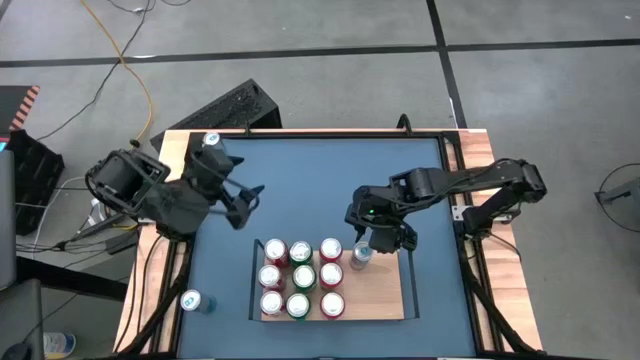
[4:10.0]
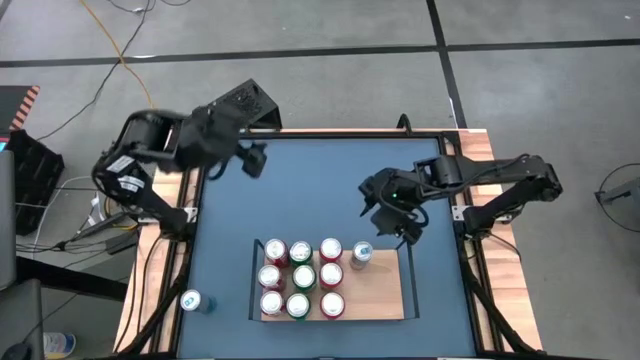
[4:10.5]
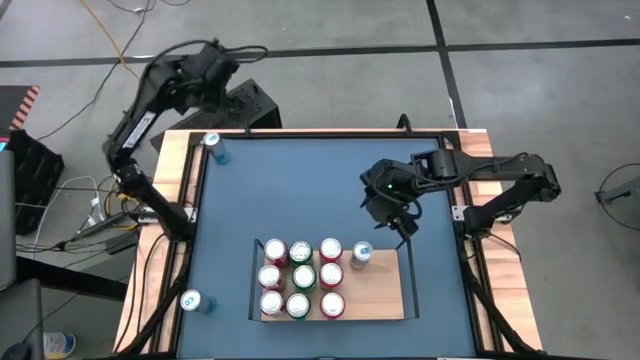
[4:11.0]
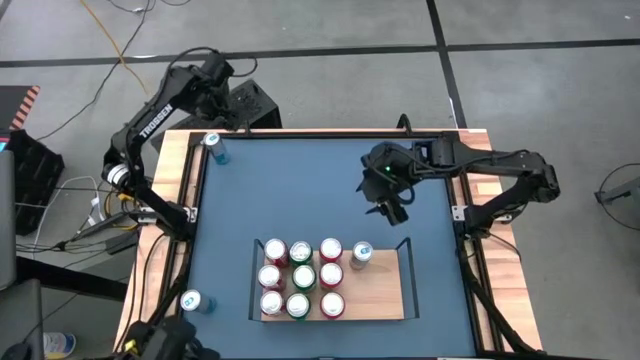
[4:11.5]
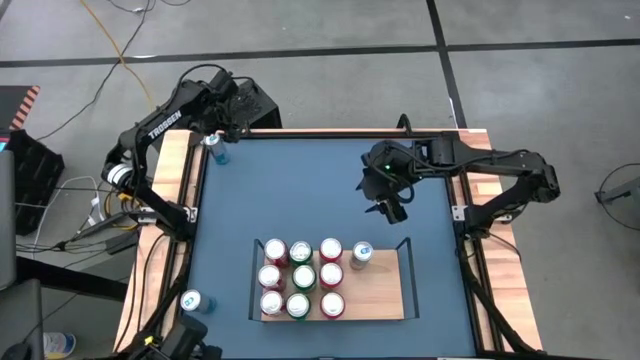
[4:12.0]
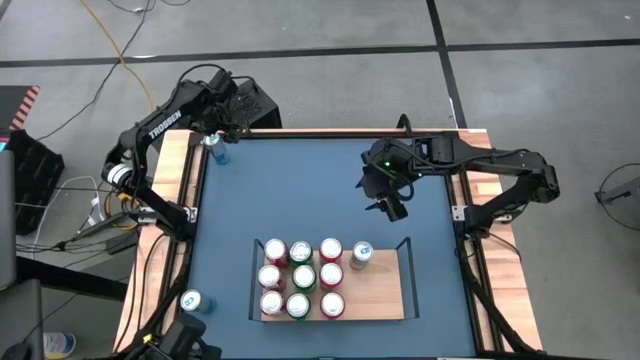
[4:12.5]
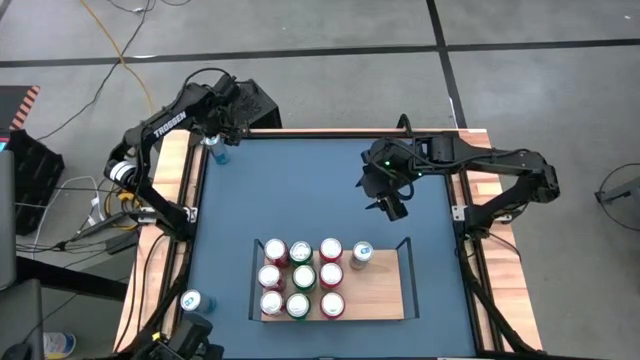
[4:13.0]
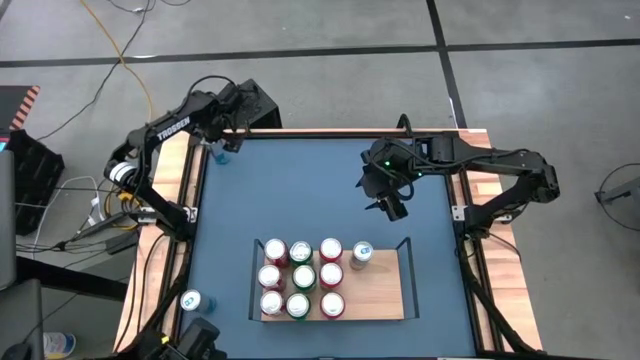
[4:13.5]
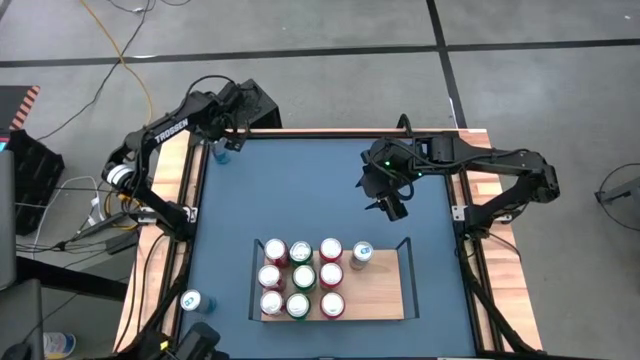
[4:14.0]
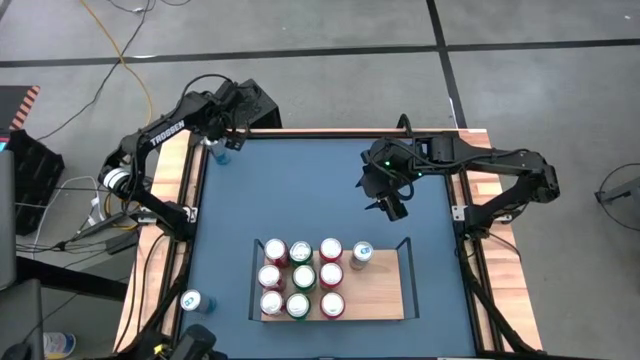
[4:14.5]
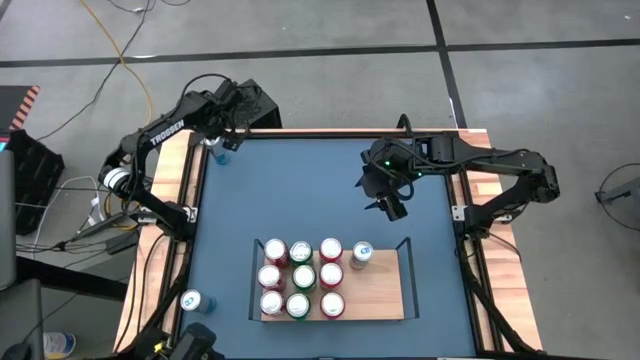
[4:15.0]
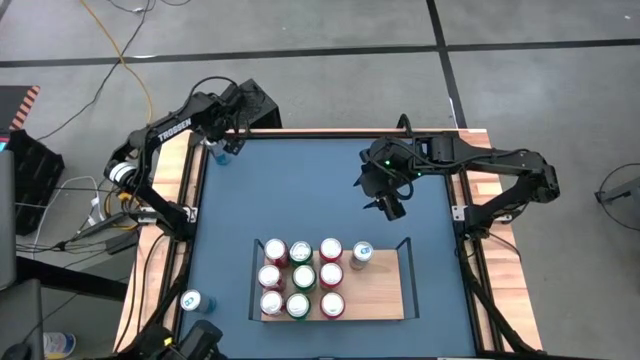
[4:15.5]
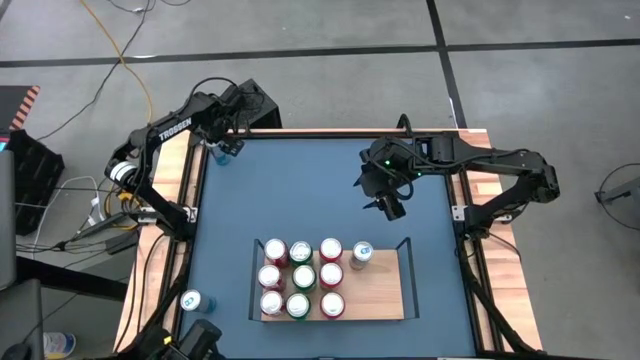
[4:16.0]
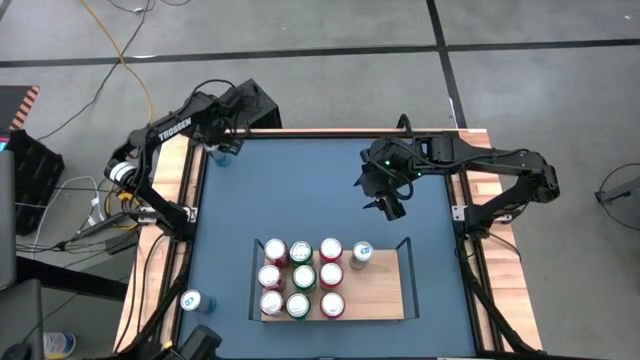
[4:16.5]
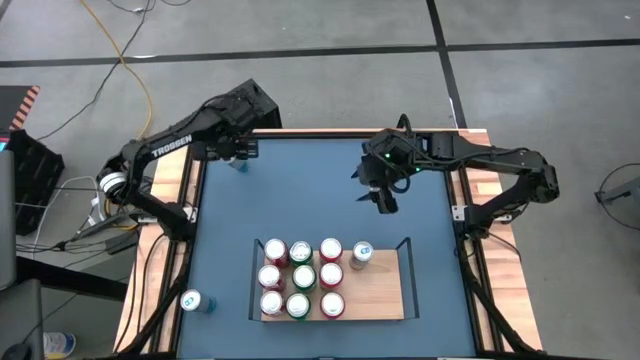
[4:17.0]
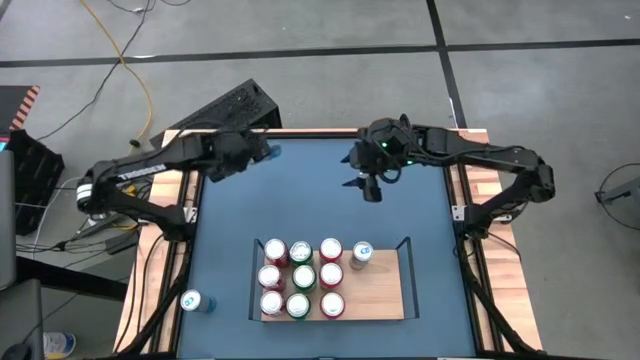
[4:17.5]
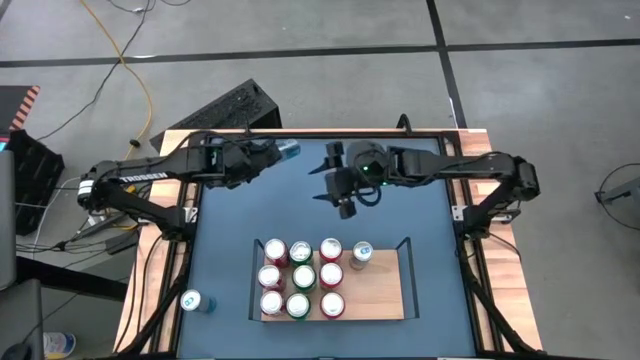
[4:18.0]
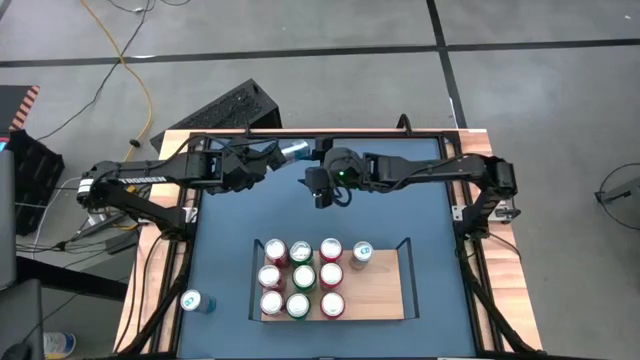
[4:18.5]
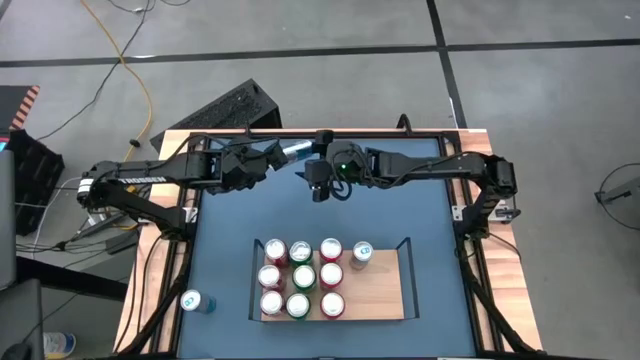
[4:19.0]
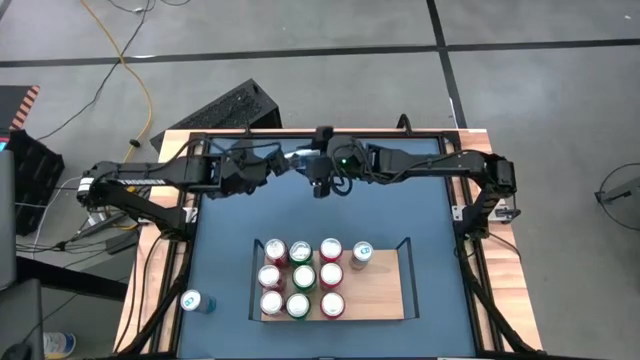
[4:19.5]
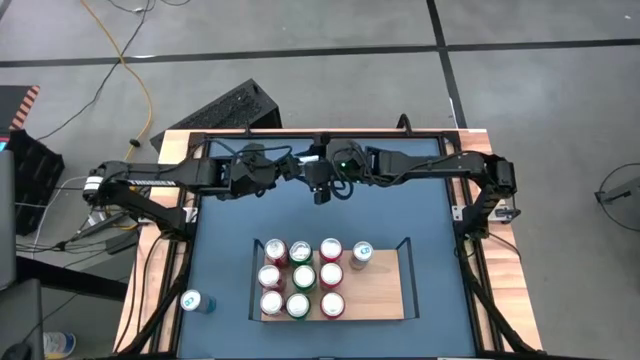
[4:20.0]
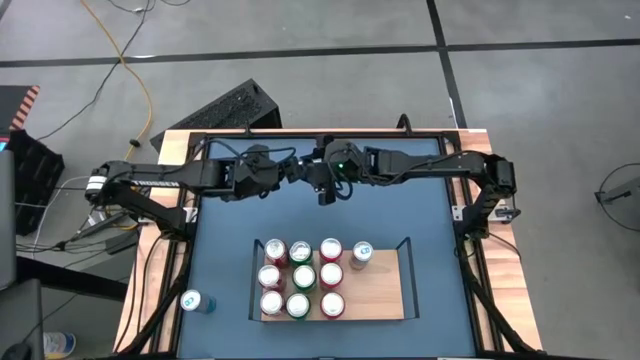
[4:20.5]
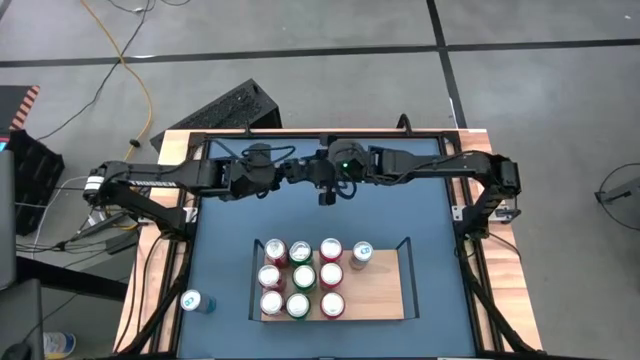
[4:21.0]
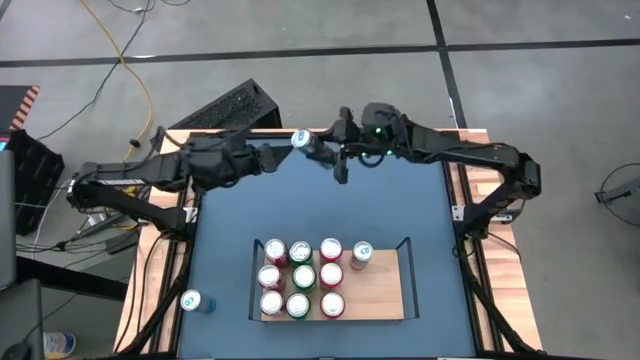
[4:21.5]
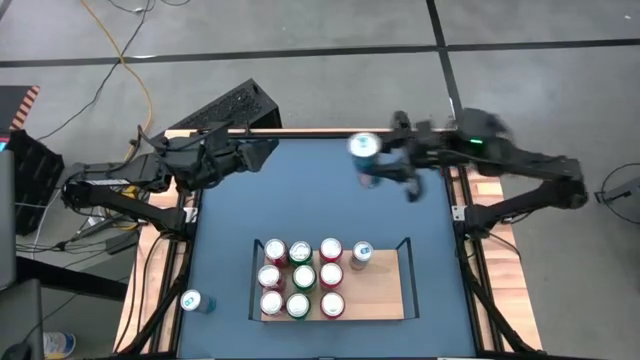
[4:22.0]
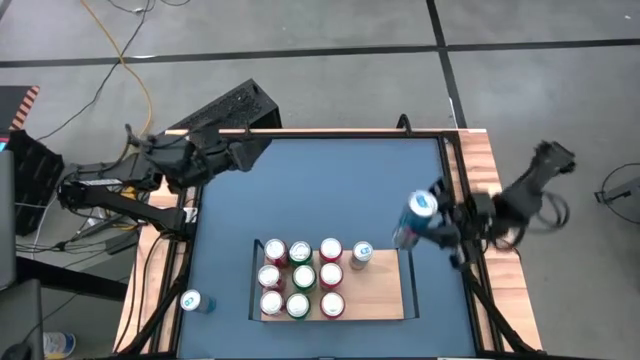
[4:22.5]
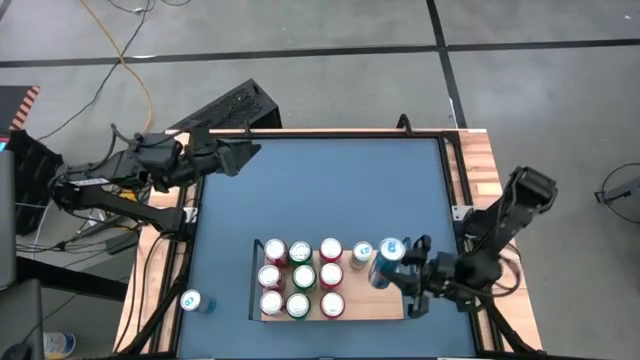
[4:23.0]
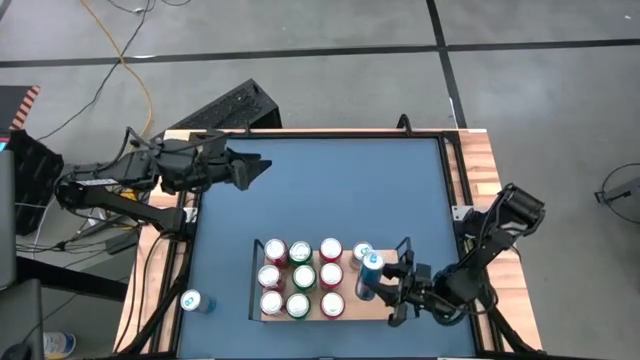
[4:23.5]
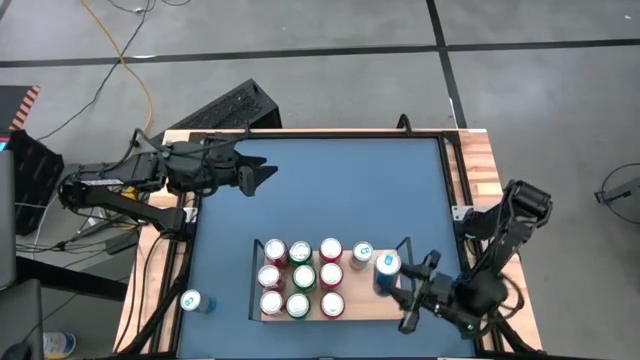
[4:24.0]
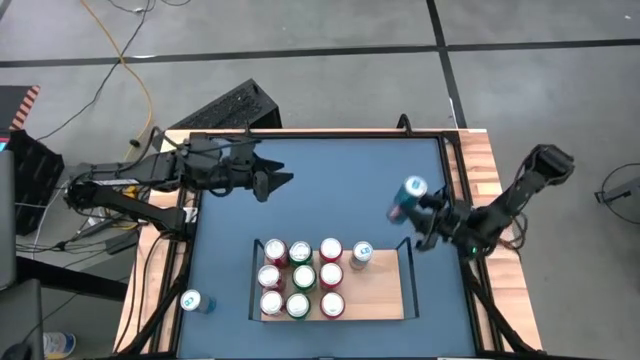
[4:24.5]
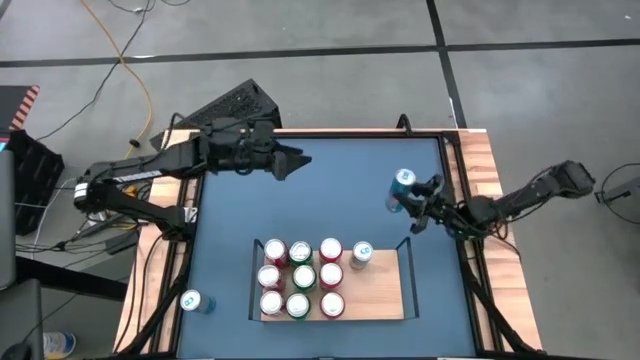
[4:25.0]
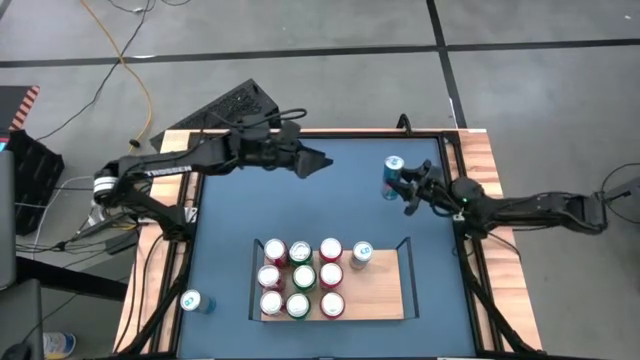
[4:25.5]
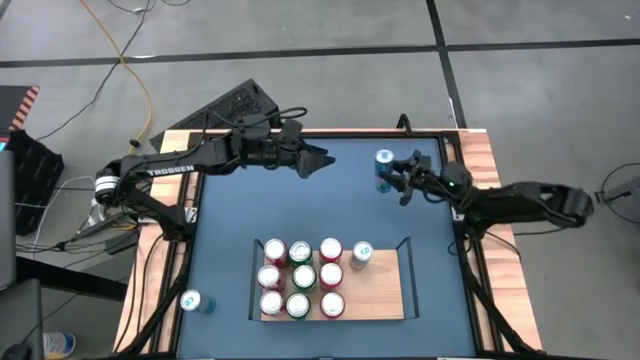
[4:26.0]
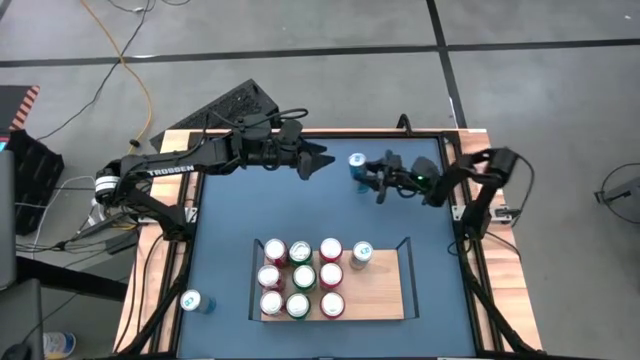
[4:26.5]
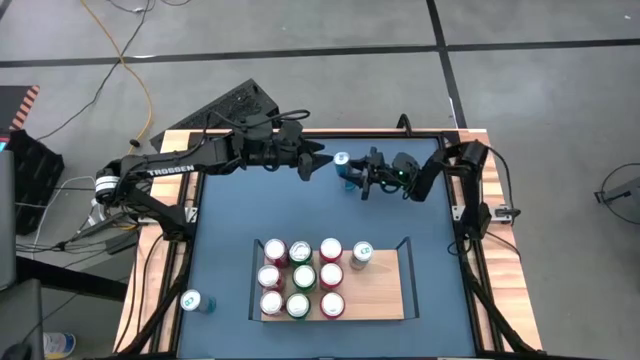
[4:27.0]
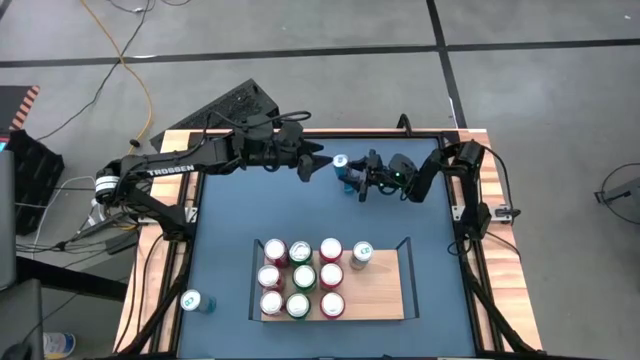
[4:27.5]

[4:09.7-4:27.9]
Task: Place canned beverage on shelf
Put the top blue soda can on the shelf aligned with the other blue soda can

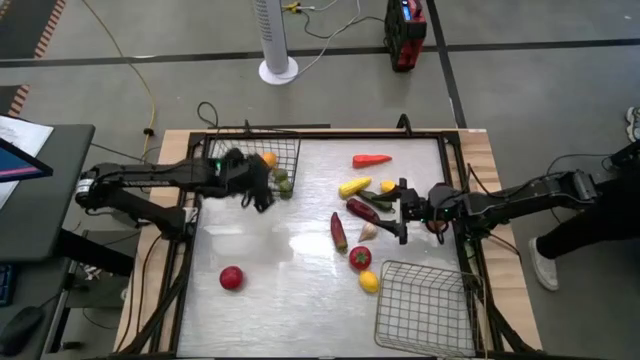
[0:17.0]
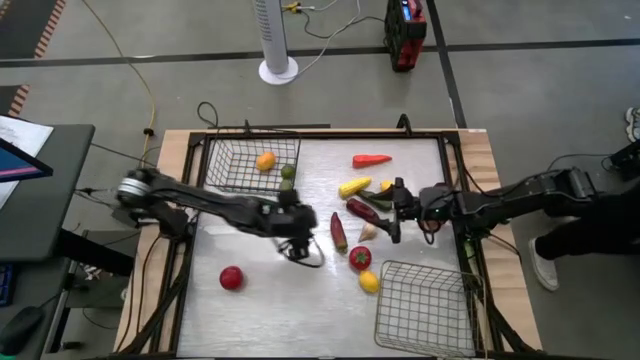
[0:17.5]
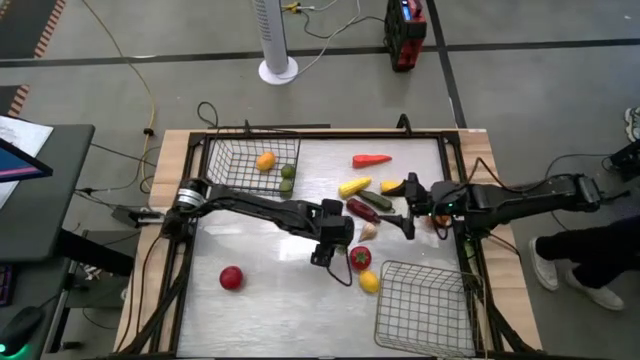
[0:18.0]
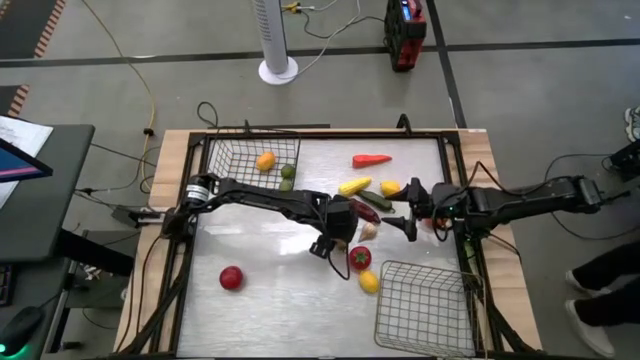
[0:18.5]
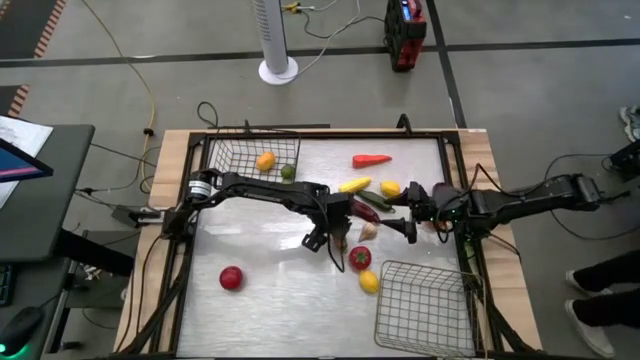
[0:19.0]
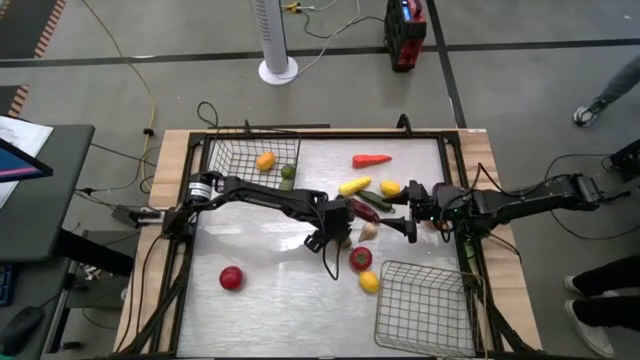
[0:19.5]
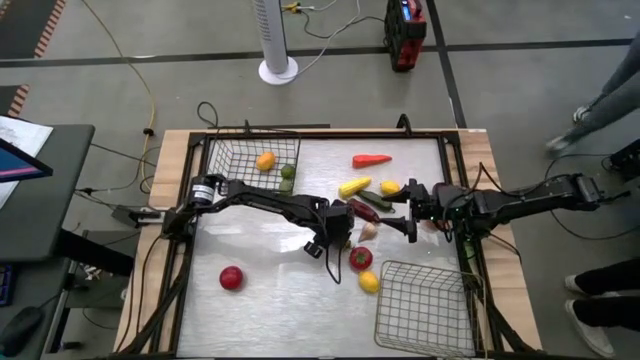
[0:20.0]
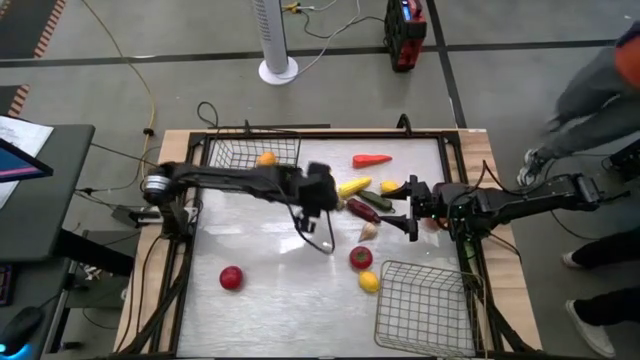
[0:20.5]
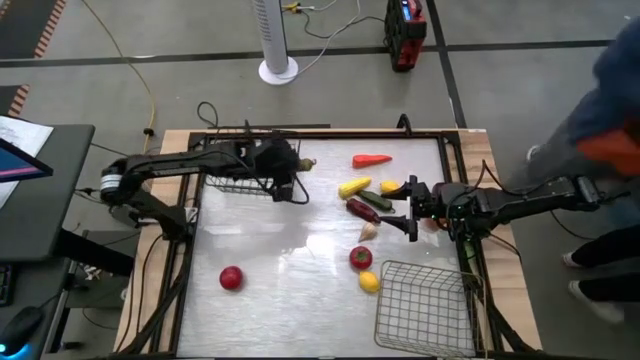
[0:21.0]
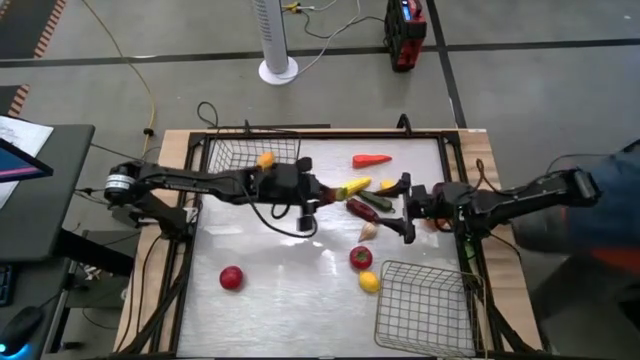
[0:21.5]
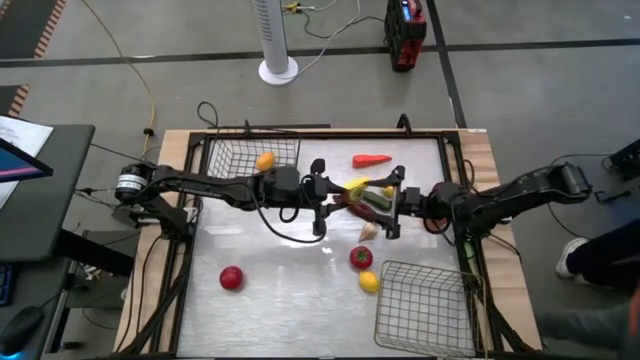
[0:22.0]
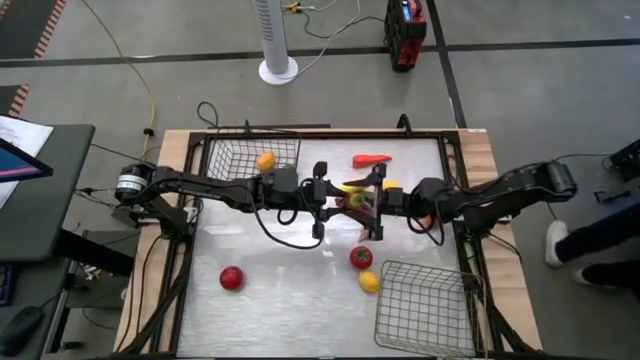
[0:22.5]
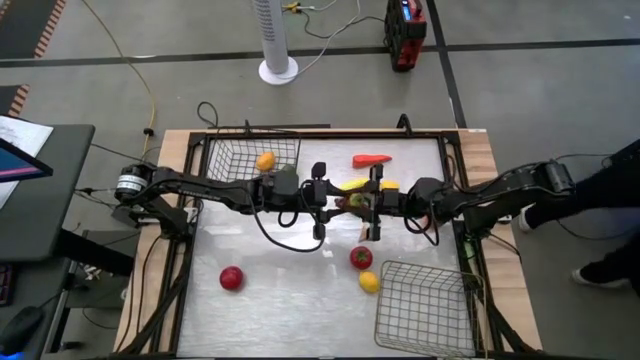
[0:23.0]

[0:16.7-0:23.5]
Task: Sort produce into baskets
Put the bottom red chili pepper into the golden wire basket
